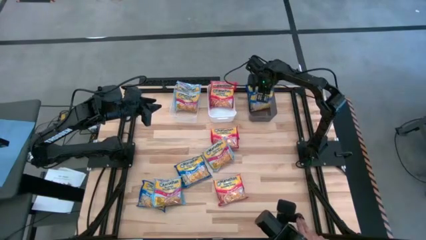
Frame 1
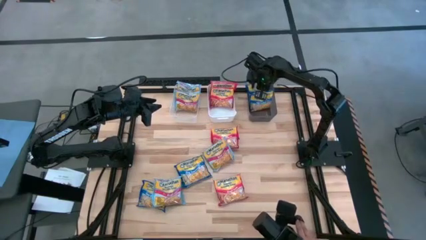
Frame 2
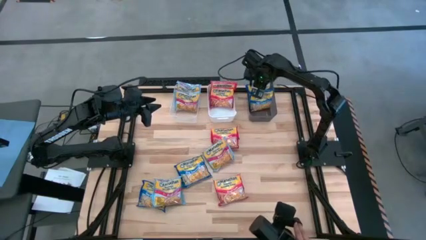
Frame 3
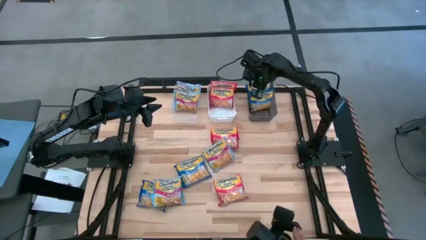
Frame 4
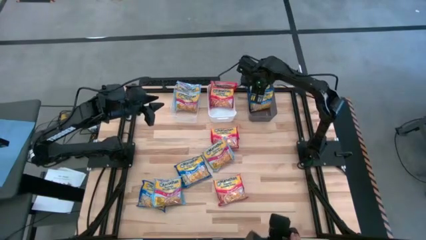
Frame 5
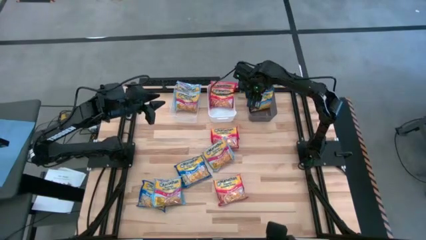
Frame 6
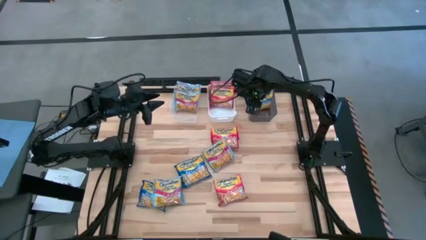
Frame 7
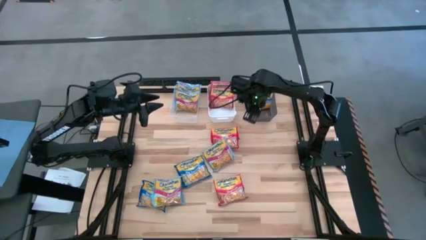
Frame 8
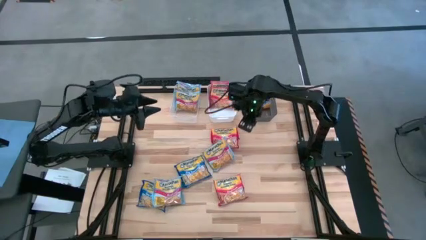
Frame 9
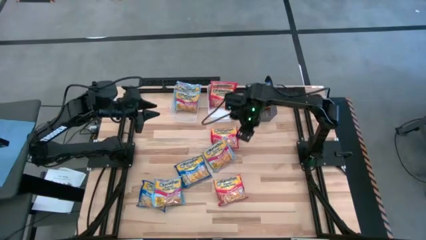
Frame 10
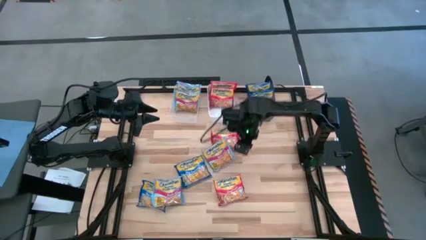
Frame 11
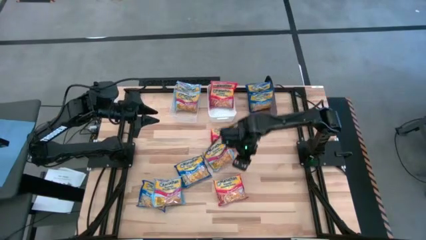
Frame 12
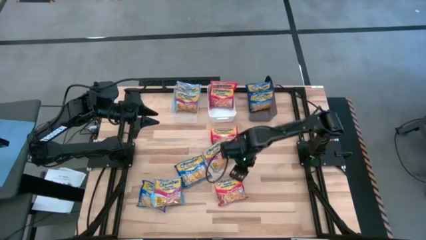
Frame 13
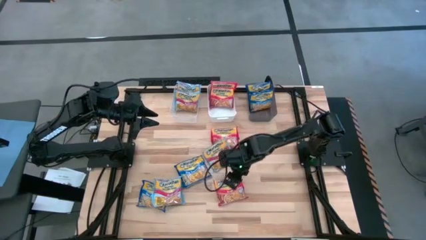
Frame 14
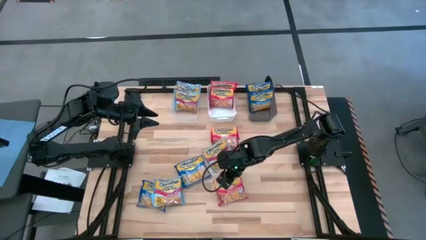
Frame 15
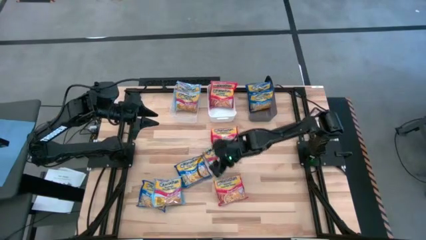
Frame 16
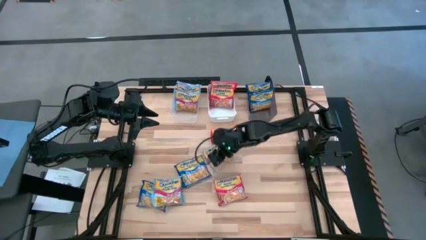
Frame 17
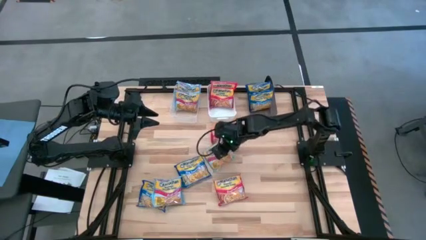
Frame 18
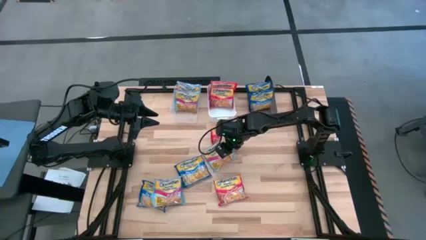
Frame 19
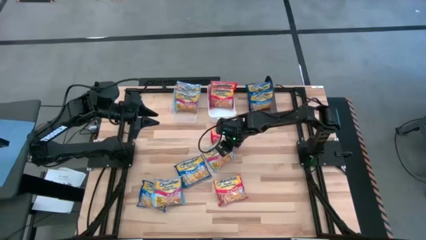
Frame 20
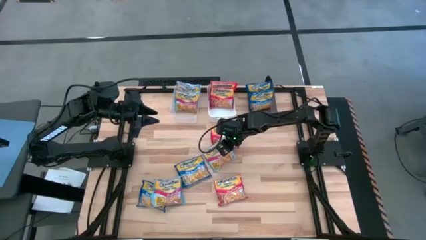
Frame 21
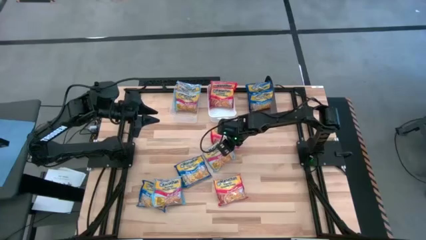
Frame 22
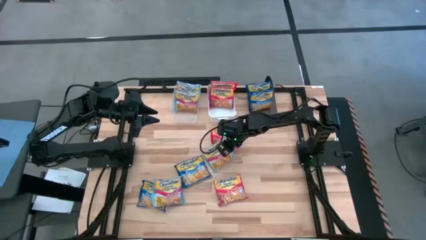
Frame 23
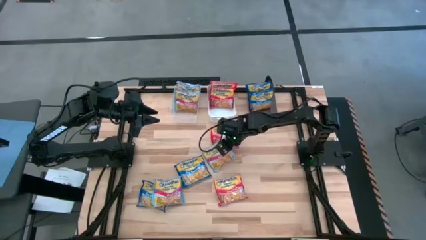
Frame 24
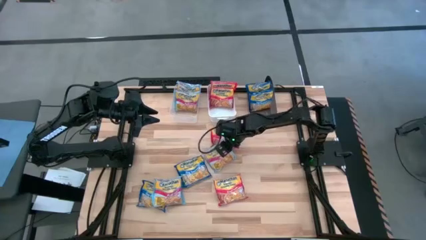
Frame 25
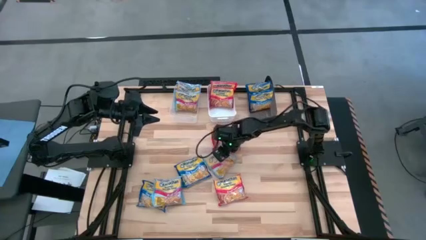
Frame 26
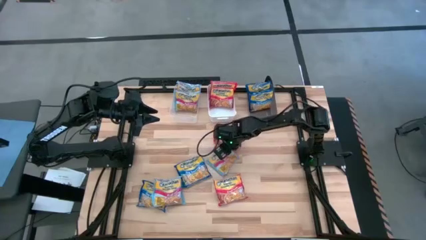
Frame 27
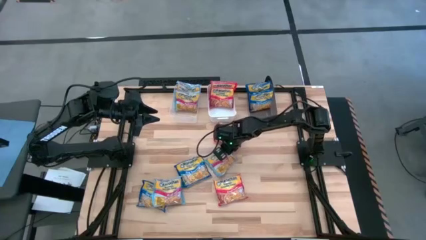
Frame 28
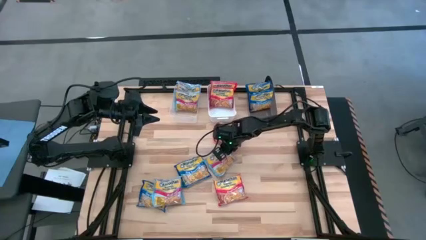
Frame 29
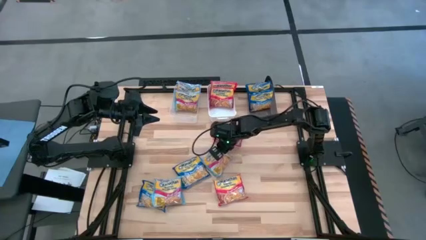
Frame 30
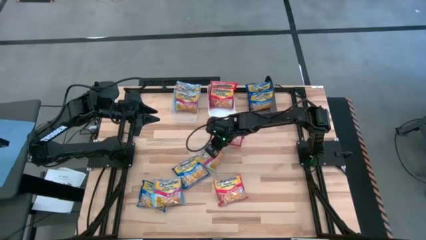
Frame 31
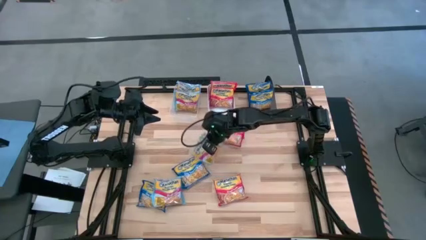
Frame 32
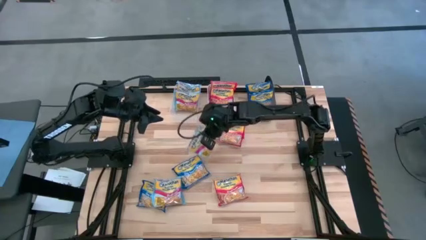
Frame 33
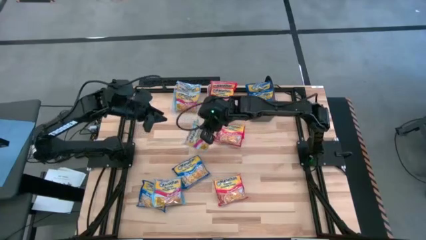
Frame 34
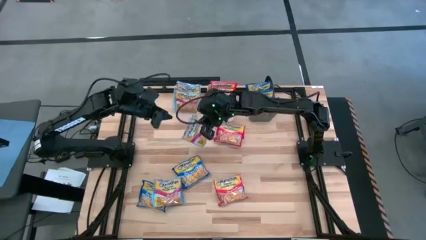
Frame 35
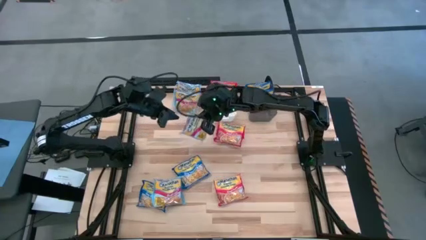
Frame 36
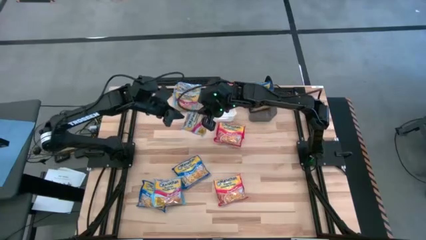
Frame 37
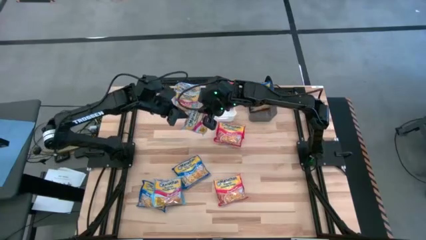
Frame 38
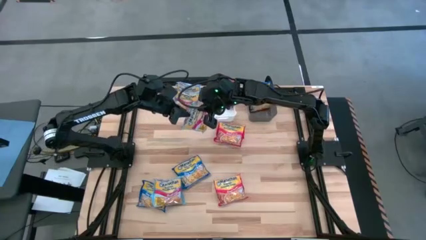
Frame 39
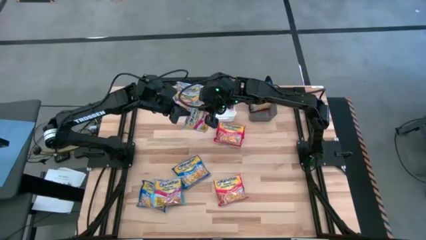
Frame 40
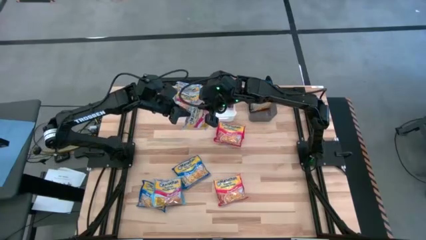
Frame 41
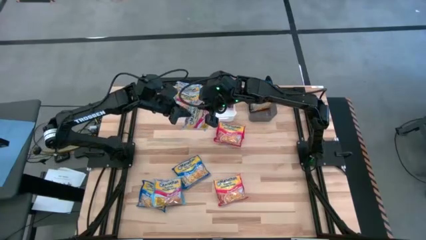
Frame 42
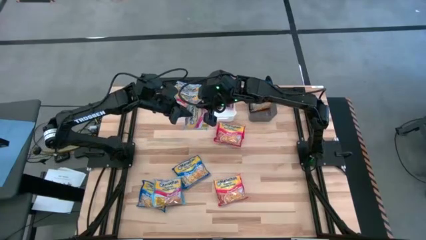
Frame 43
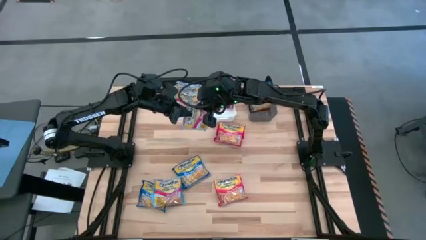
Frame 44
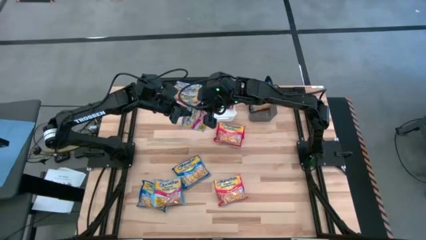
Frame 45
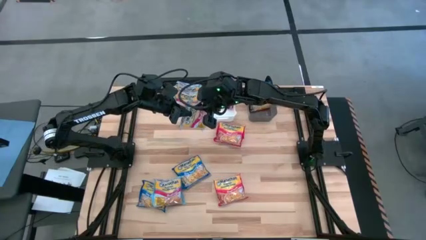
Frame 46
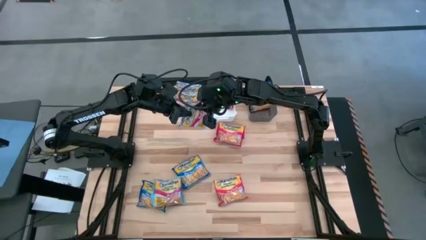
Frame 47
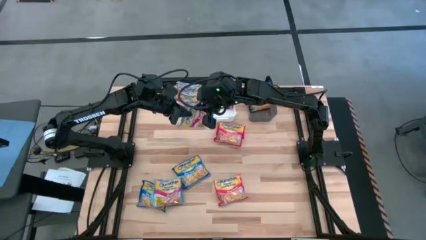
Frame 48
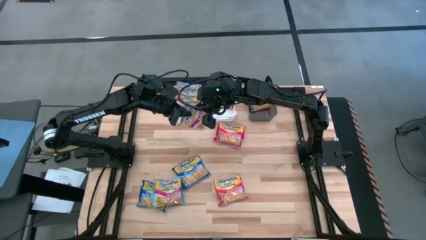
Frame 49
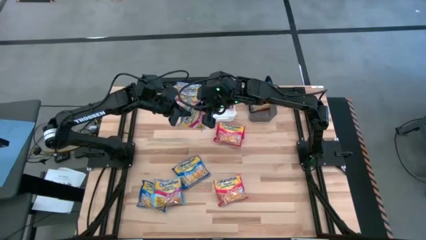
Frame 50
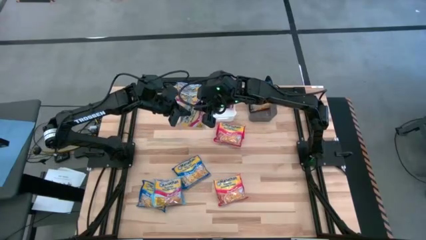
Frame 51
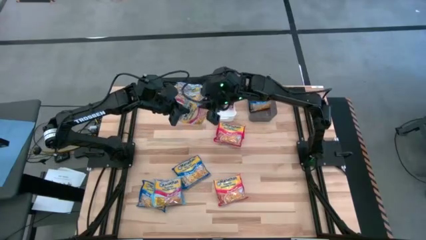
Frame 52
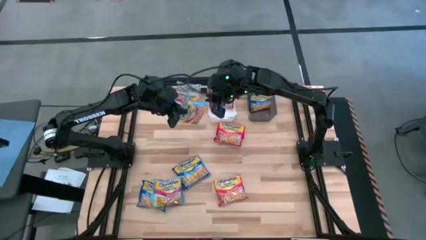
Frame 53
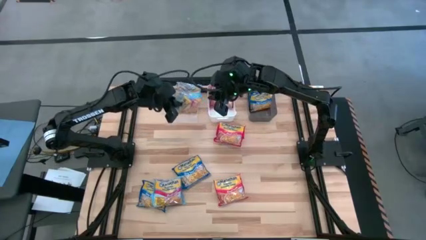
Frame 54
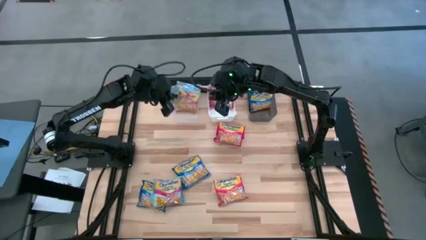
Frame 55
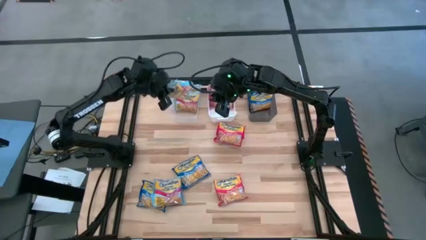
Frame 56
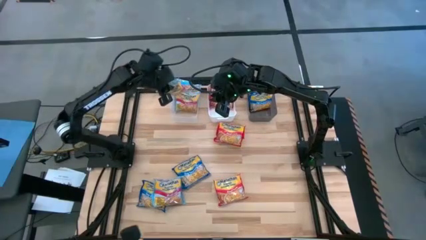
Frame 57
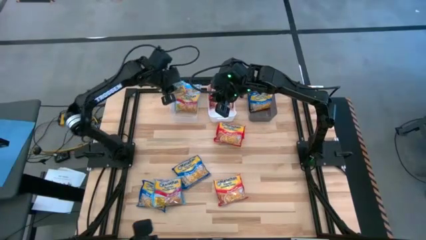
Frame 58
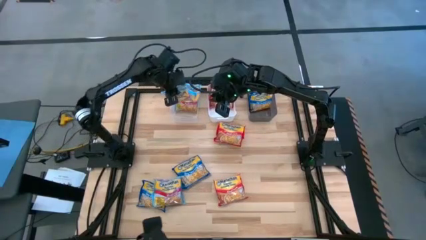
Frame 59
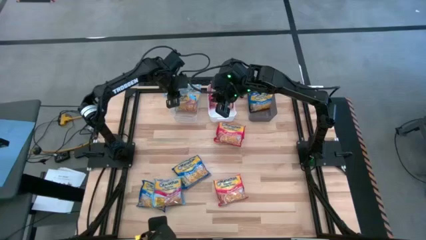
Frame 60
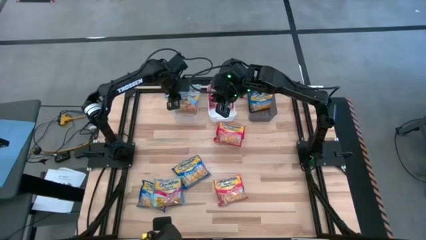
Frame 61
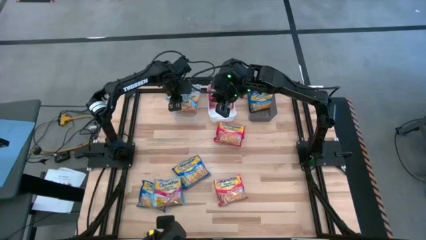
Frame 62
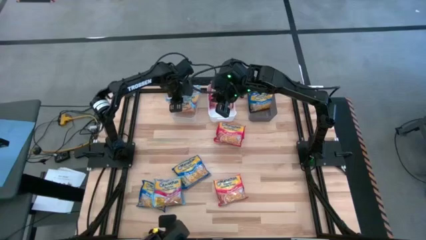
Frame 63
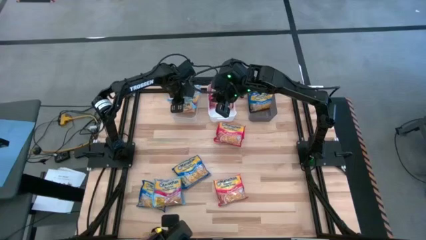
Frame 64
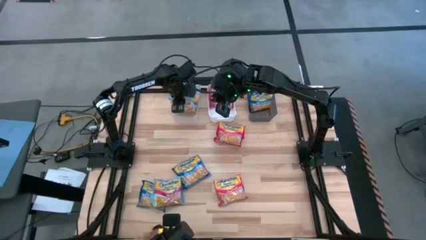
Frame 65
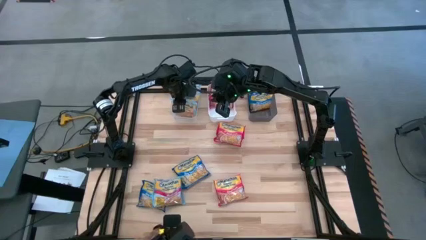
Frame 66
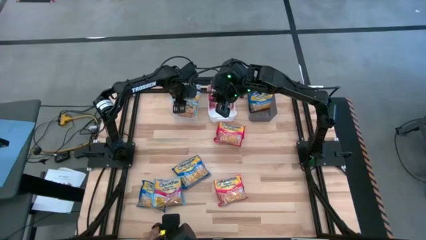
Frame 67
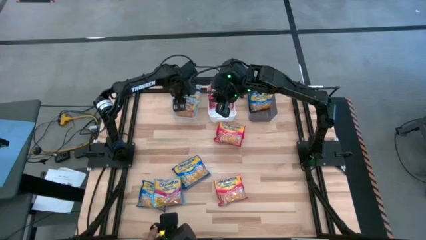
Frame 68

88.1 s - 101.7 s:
Task: Sort Maruchan noodles
Put the light blue bag into the transparent bin
